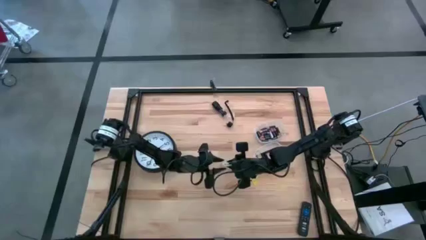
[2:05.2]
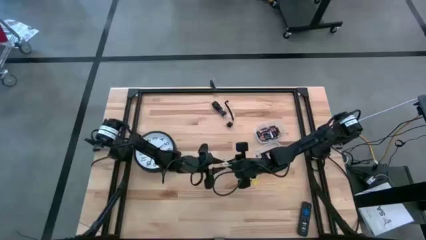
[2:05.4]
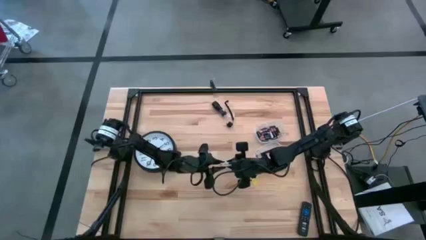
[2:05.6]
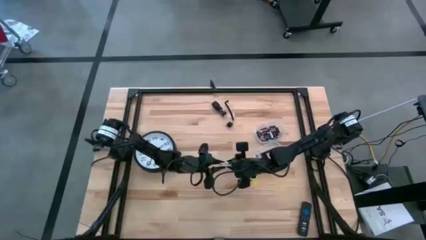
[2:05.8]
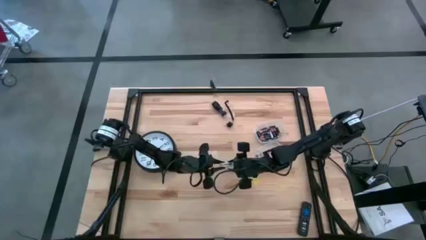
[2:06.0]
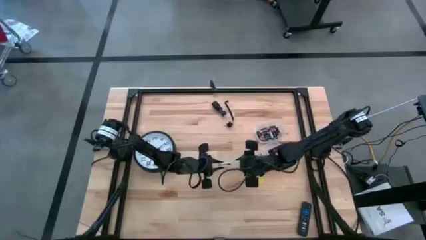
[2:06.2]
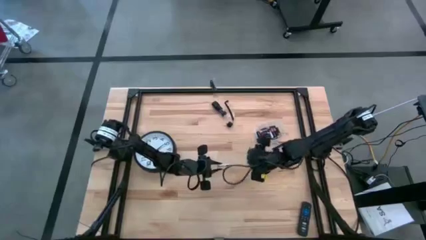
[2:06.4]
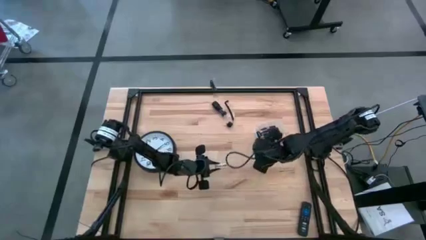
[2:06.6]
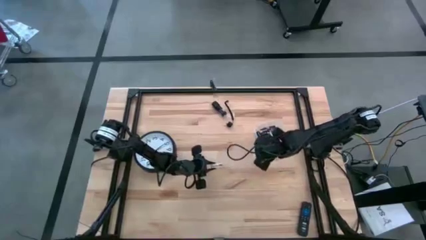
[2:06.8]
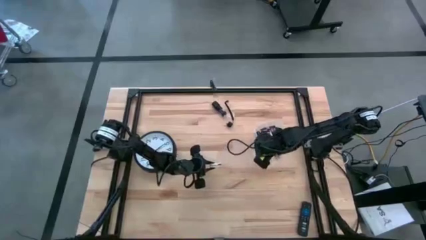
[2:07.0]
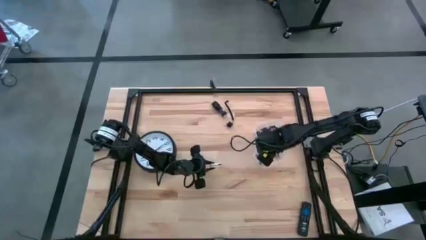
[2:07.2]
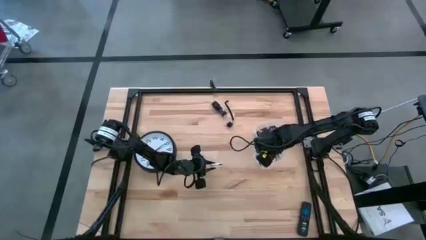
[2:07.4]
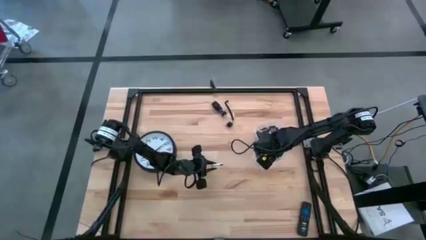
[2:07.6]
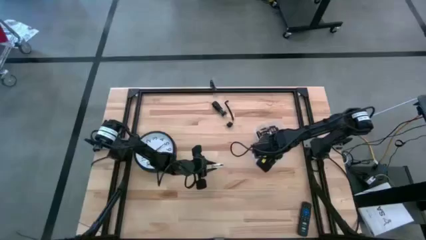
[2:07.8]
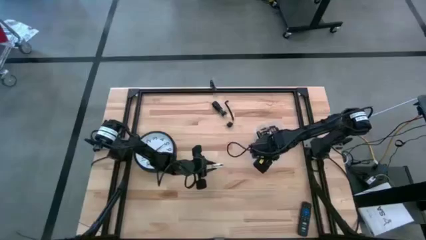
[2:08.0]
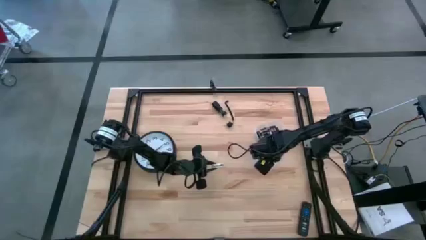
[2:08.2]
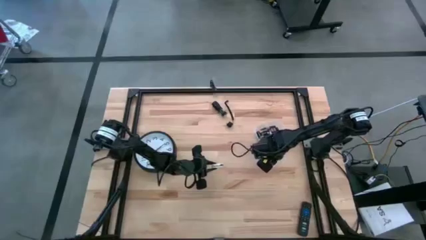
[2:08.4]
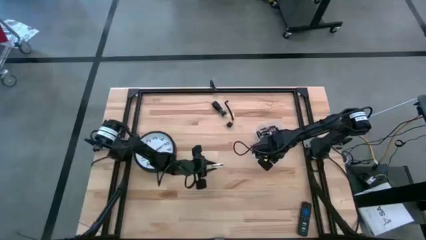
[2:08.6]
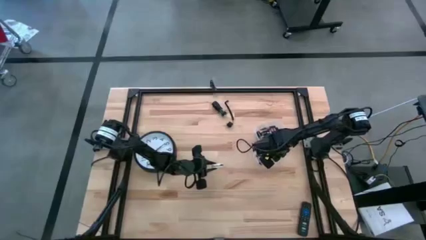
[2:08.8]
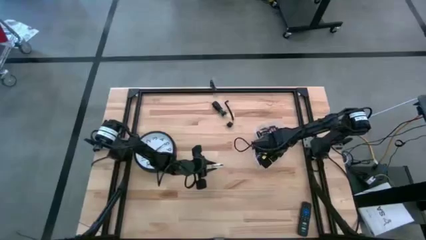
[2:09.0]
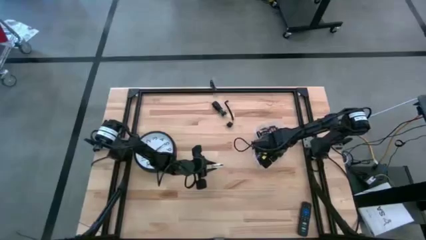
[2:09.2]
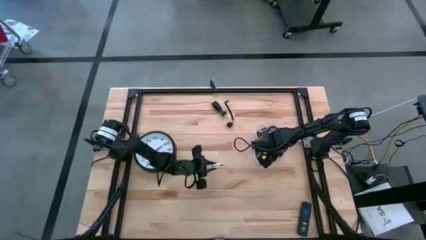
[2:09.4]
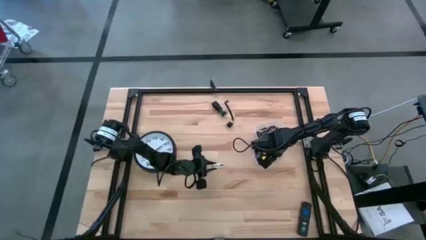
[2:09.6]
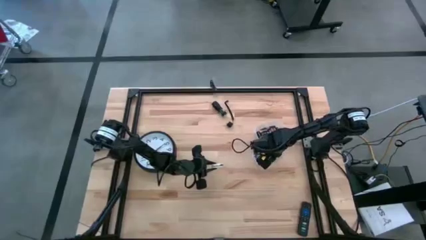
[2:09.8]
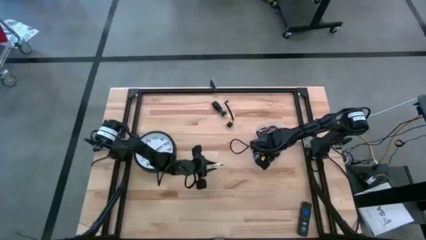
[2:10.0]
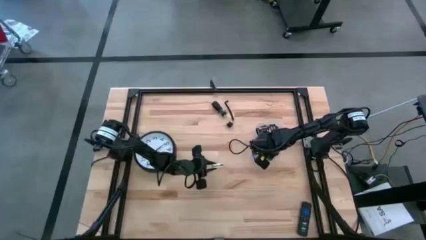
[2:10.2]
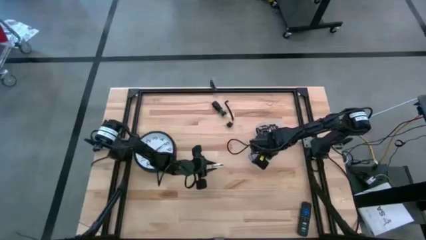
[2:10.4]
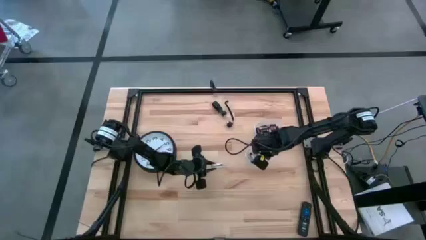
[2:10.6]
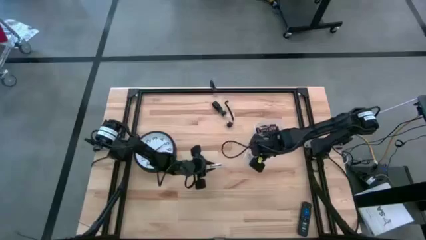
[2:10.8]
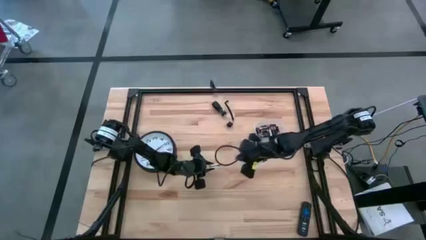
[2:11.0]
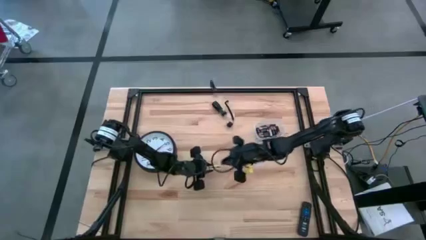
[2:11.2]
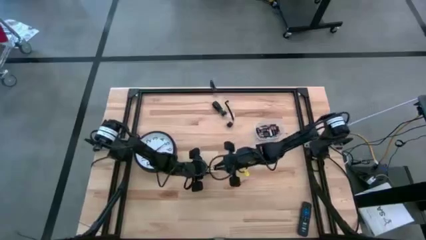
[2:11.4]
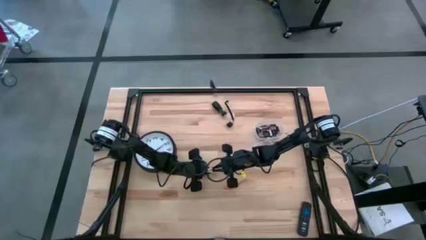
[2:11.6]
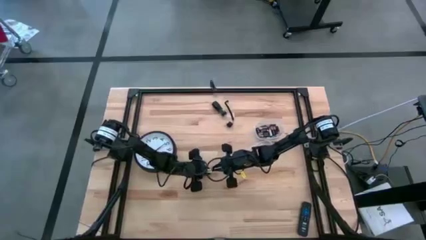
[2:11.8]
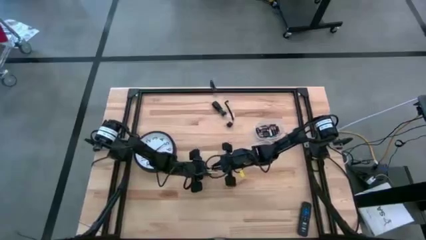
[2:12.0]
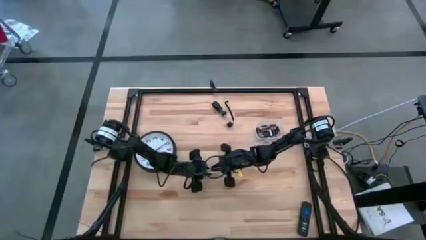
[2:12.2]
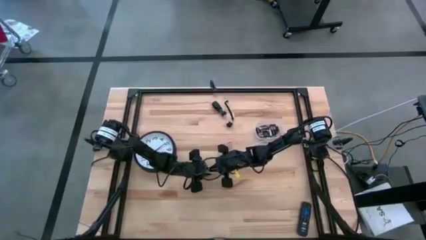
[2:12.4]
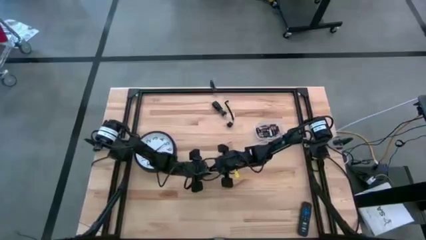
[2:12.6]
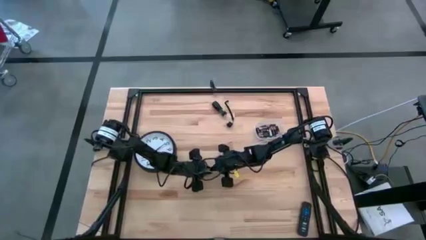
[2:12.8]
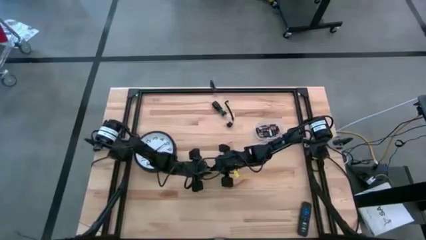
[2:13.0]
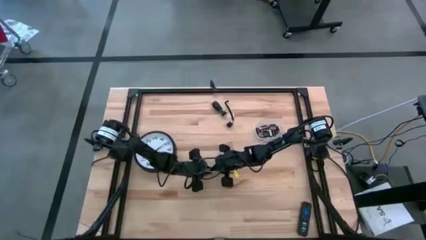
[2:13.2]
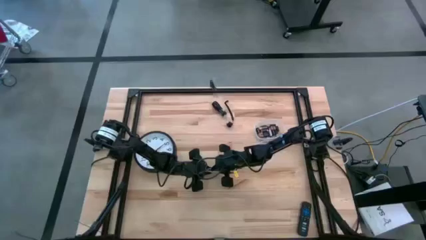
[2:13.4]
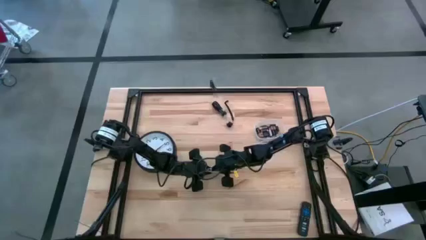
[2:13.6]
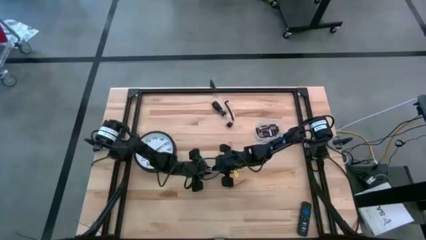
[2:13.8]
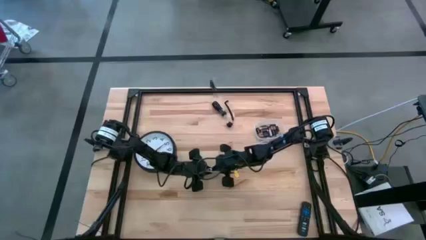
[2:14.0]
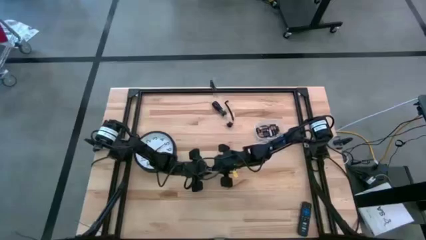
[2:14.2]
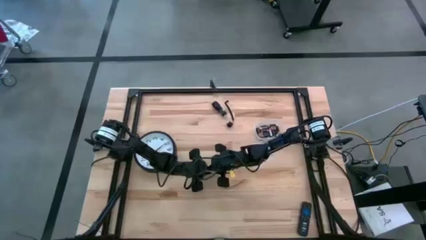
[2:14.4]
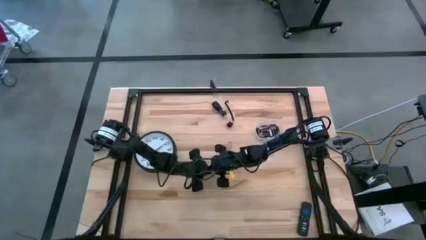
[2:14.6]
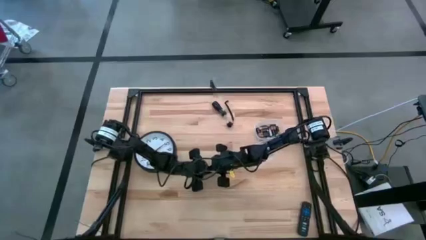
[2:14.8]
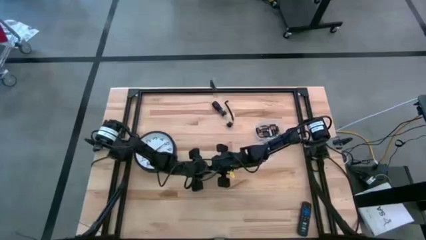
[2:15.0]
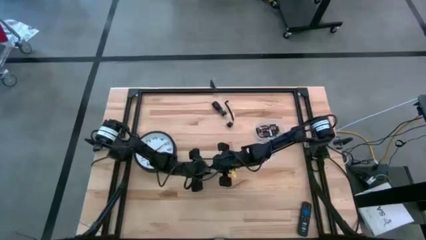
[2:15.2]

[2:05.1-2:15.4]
Task: Insert battery
Insert the silver battery into the white flashlight battery holder

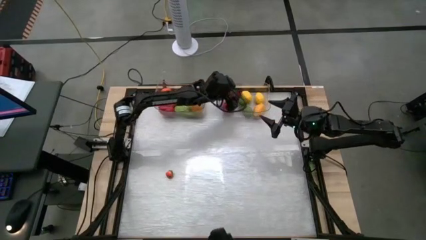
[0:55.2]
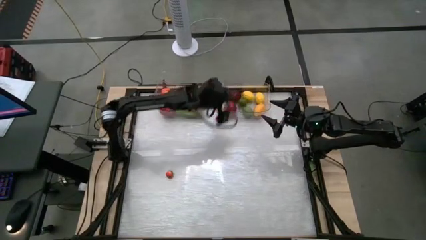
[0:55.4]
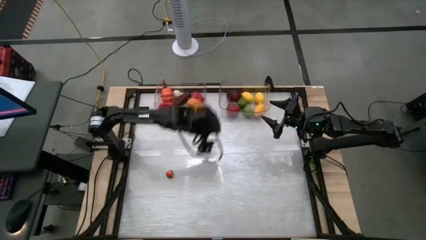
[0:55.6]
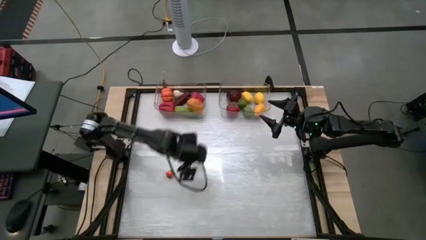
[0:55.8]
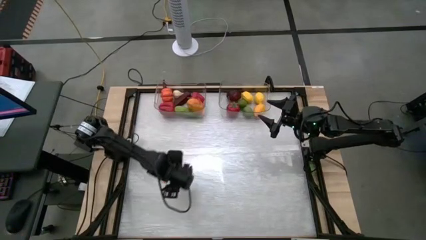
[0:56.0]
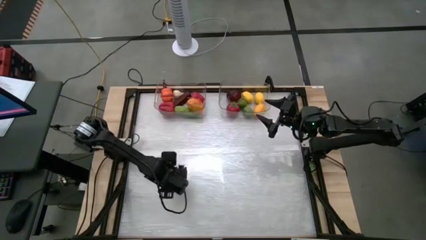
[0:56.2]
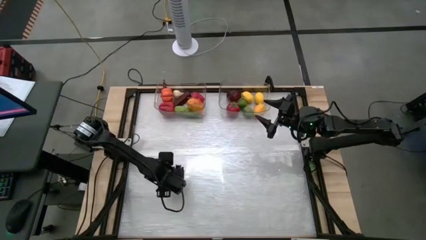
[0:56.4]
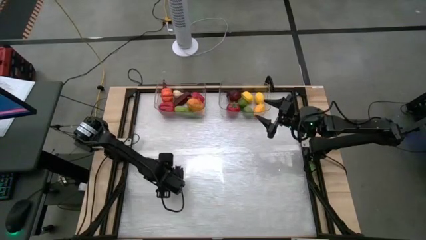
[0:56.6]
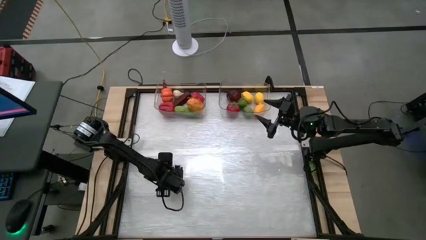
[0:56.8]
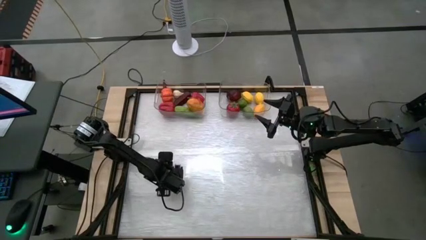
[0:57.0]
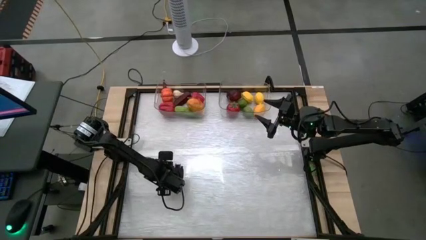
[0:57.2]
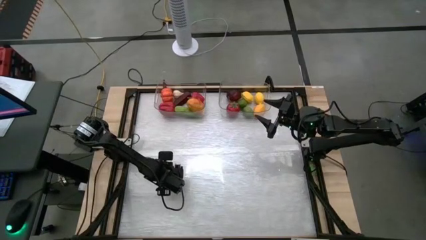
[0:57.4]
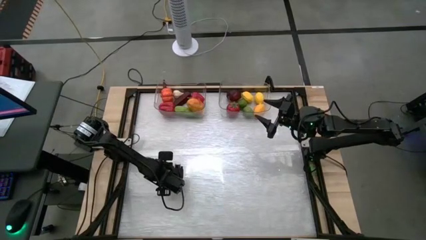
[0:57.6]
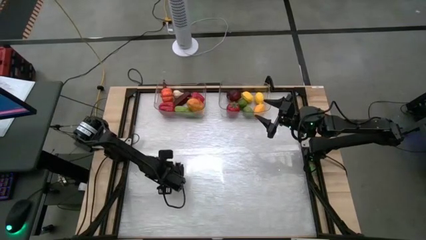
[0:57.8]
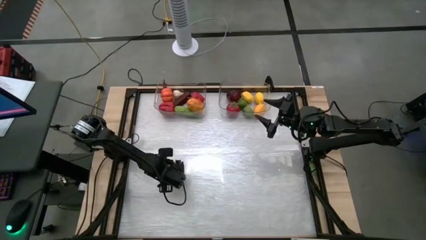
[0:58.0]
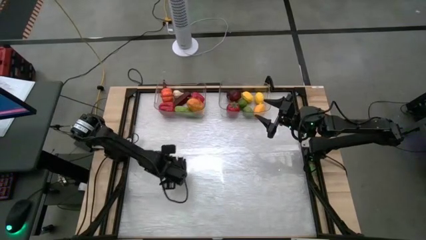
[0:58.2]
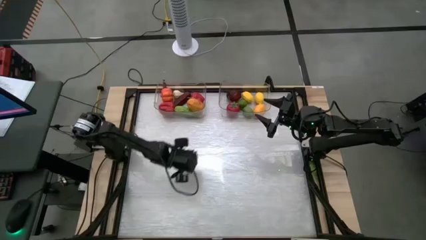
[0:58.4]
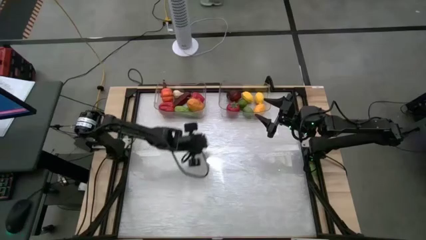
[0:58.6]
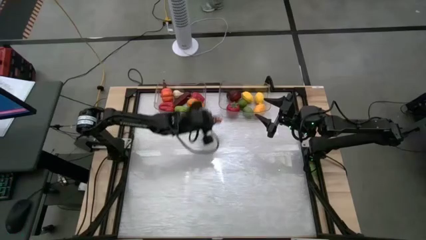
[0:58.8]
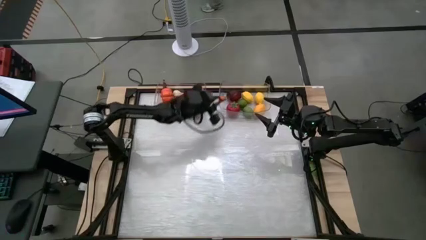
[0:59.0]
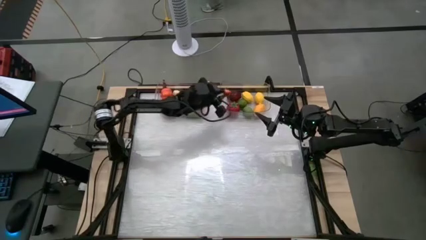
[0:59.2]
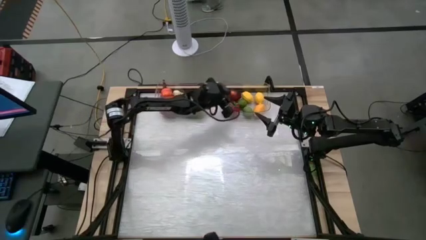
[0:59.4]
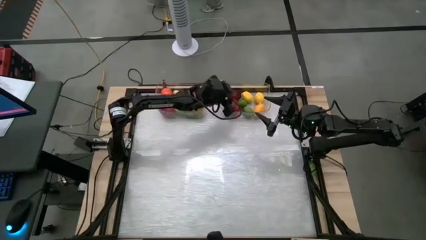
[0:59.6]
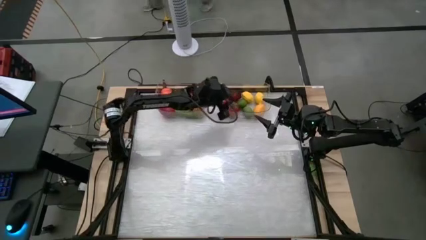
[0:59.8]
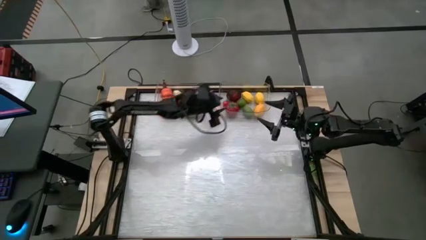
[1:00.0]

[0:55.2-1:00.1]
Task: Sort produce into baskets
Put the pepper in the container

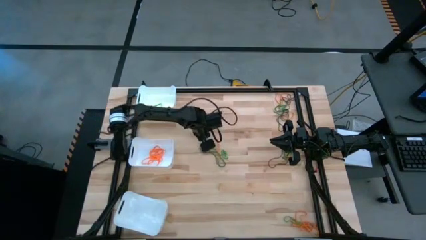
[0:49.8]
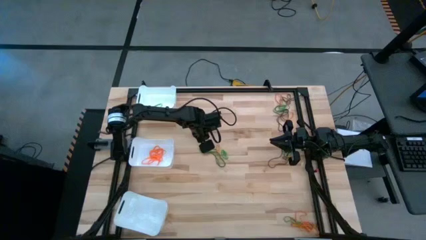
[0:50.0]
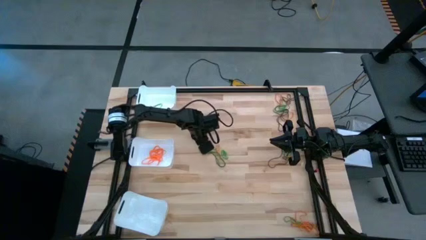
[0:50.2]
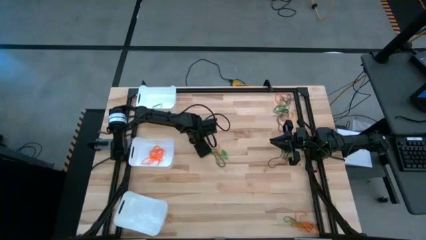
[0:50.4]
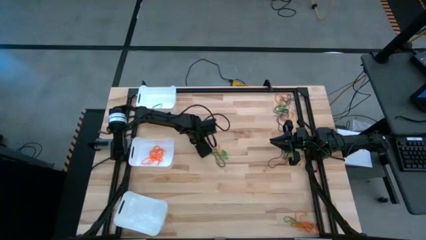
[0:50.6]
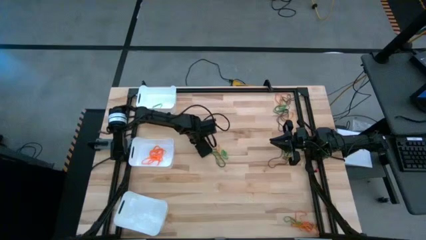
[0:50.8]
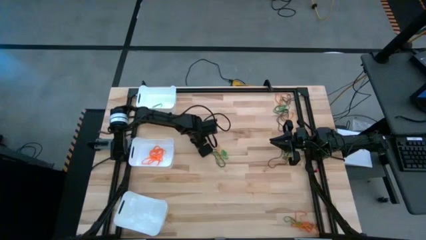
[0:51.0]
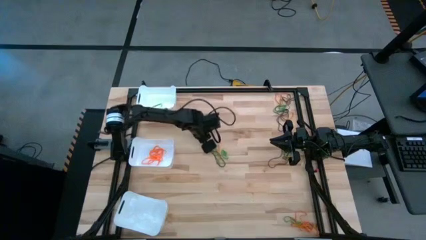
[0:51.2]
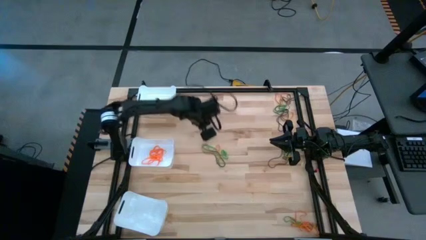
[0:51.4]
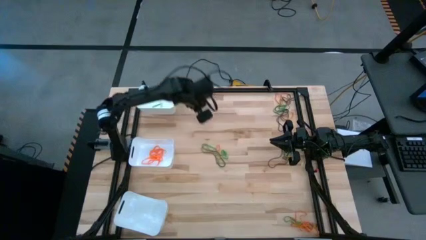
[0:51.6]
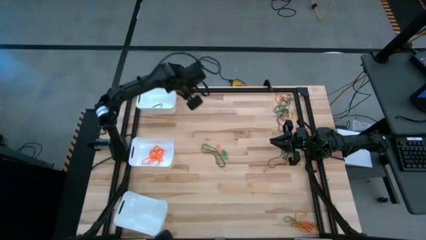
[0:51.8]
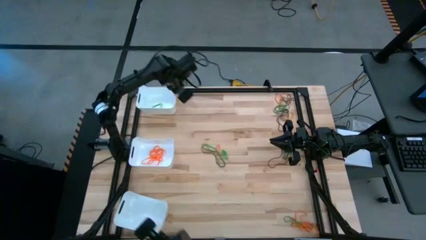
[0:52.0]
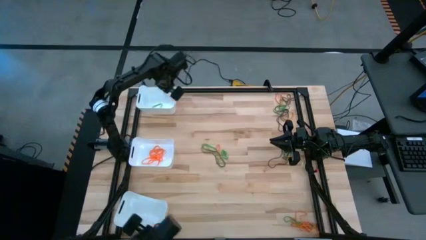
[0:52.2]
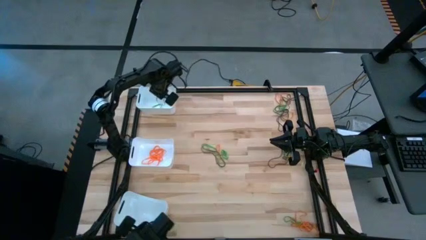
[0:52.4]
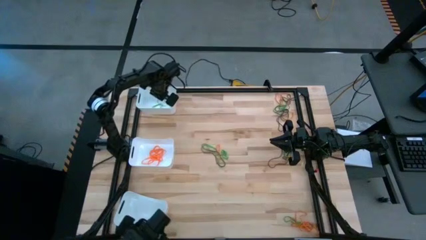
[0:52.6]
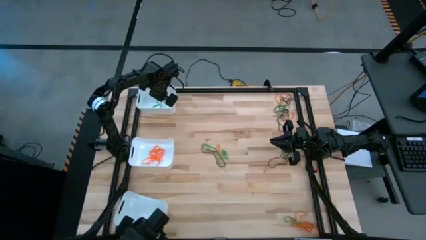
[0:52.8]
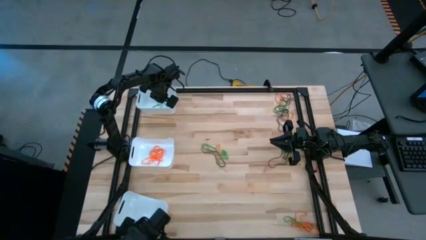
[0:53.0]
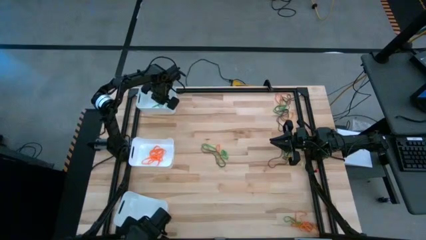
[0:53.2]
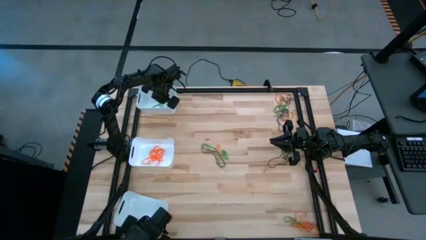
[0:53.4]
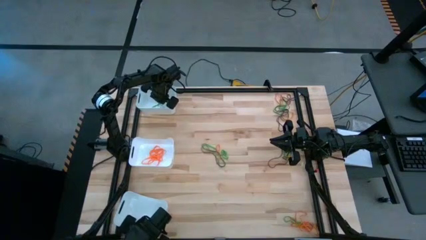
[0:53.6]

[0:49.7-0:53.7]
Task: Sort rubber bands into baskets
Put the green rubber band into the top white bin
